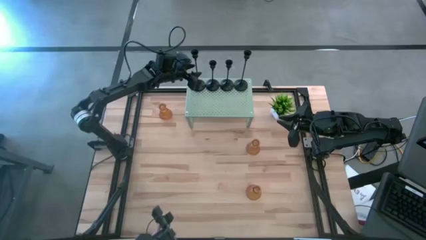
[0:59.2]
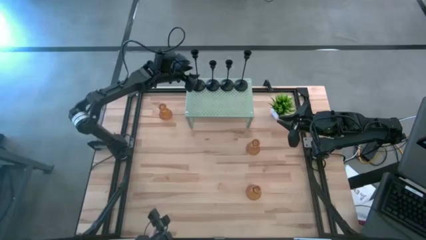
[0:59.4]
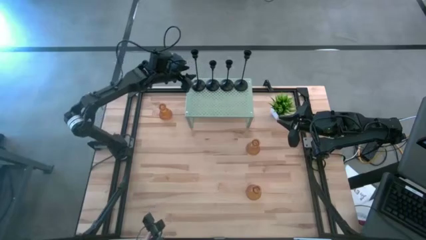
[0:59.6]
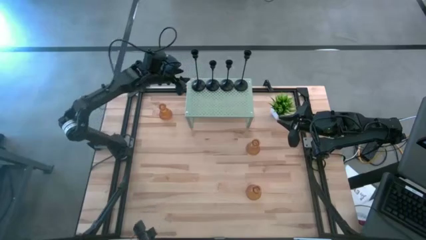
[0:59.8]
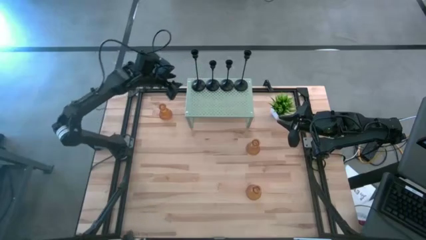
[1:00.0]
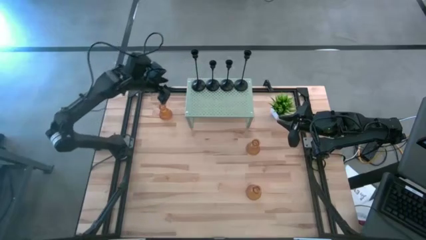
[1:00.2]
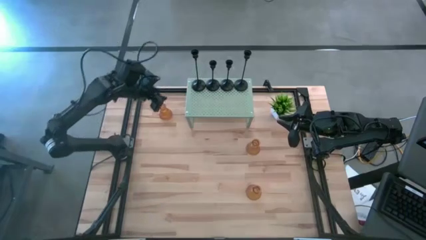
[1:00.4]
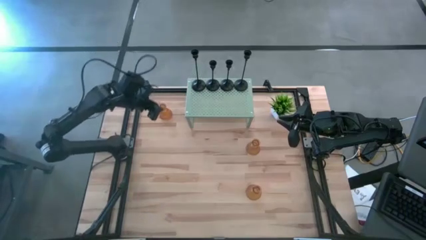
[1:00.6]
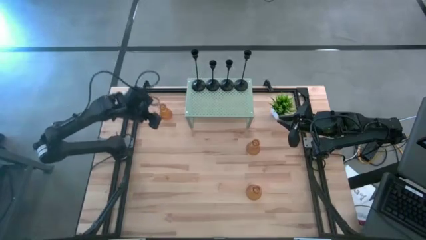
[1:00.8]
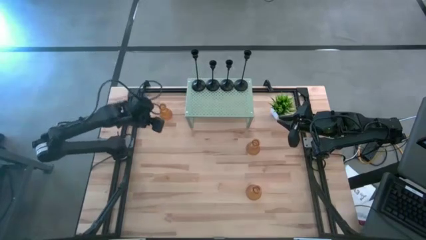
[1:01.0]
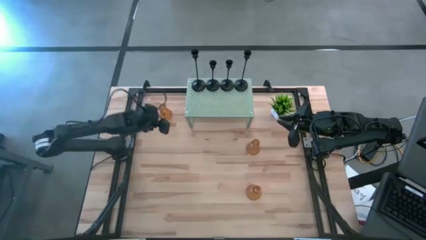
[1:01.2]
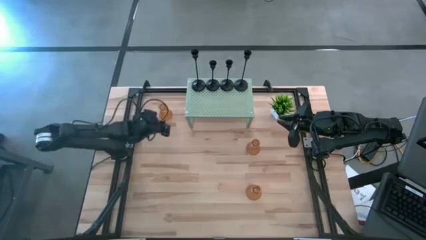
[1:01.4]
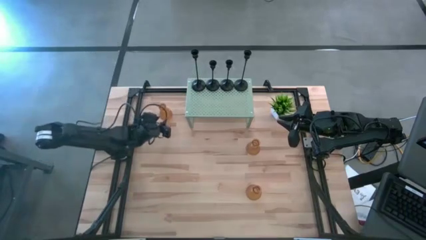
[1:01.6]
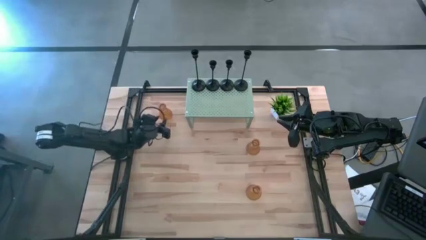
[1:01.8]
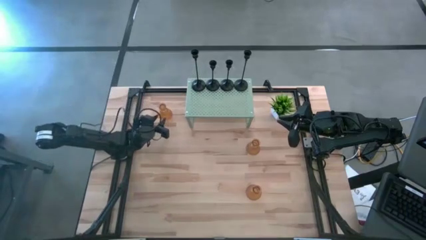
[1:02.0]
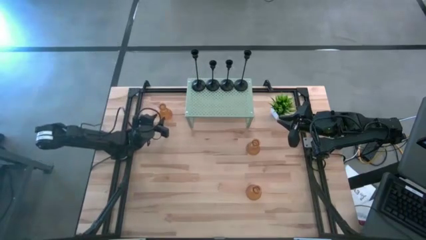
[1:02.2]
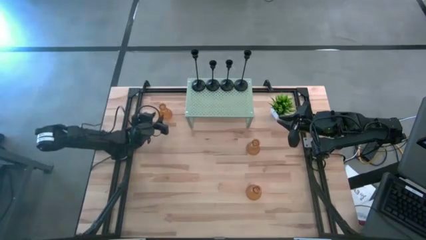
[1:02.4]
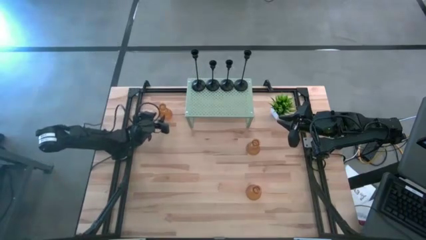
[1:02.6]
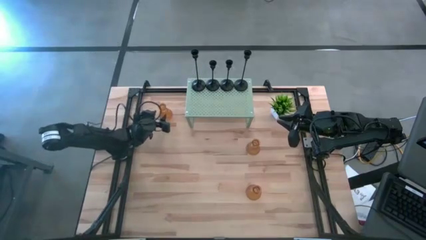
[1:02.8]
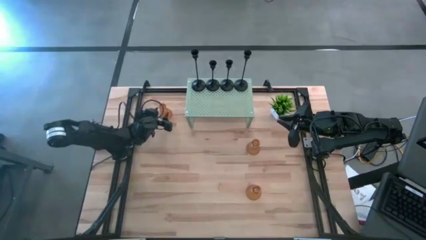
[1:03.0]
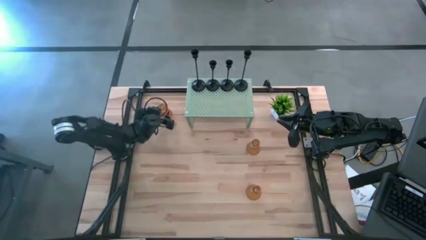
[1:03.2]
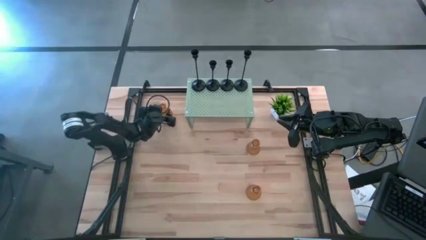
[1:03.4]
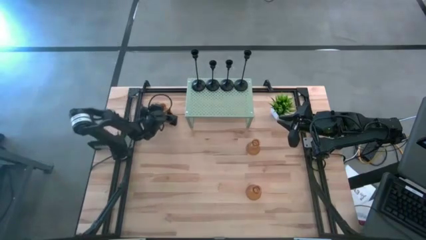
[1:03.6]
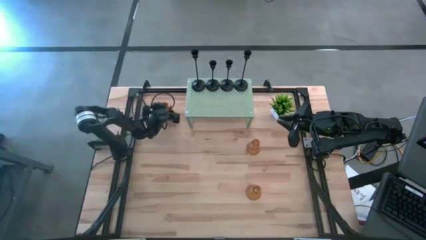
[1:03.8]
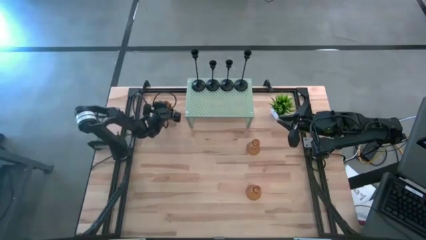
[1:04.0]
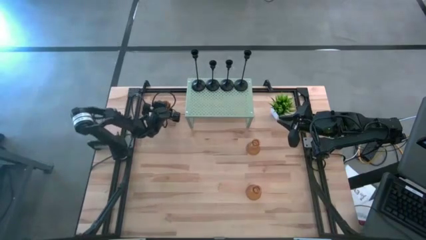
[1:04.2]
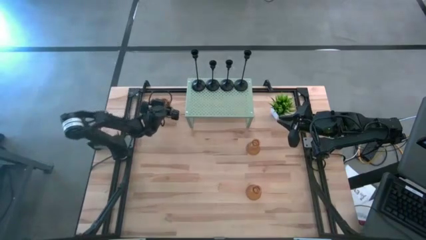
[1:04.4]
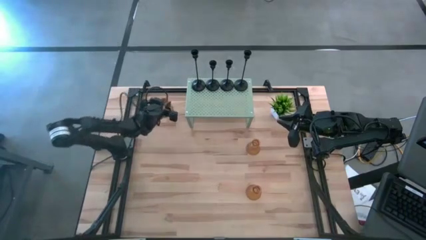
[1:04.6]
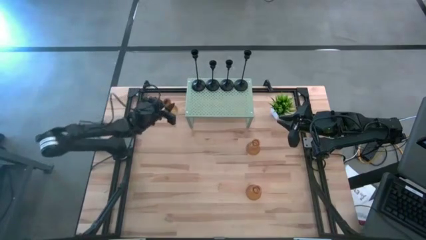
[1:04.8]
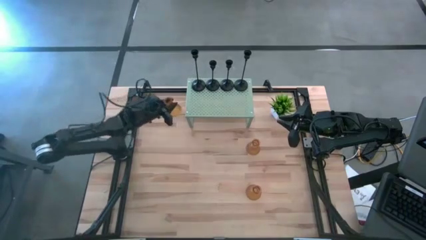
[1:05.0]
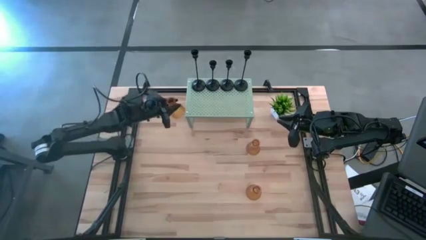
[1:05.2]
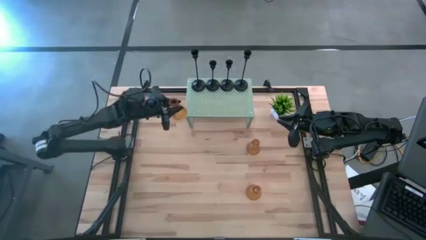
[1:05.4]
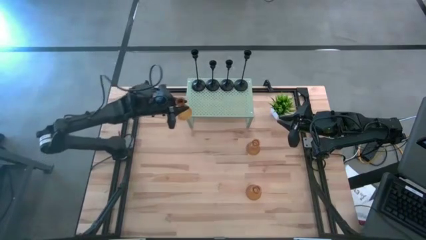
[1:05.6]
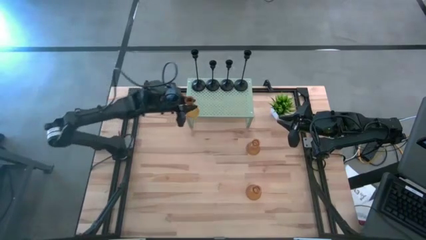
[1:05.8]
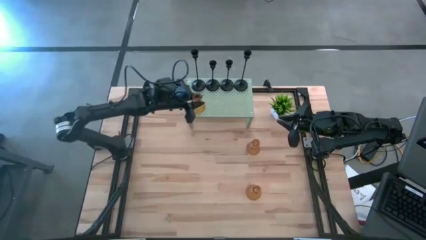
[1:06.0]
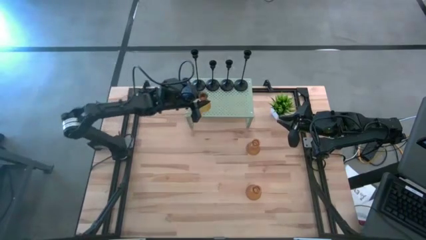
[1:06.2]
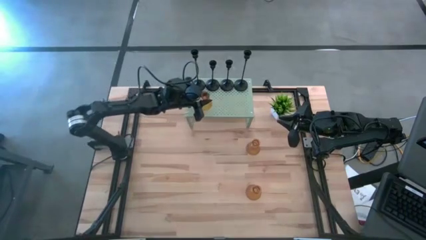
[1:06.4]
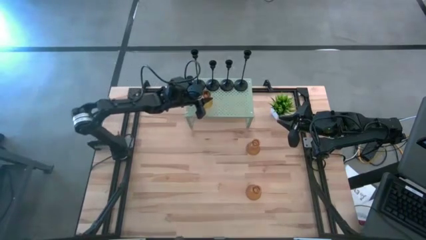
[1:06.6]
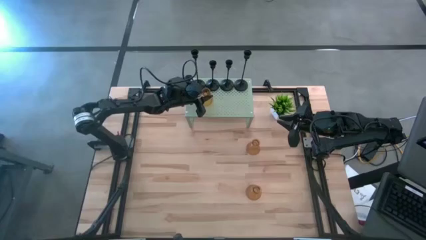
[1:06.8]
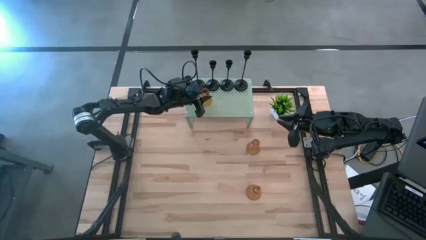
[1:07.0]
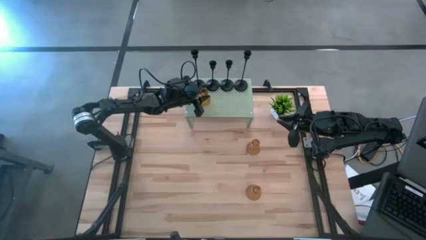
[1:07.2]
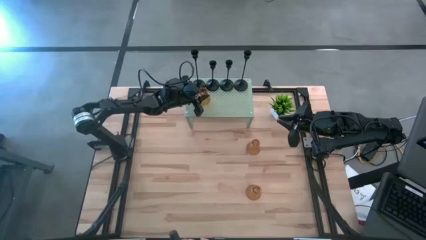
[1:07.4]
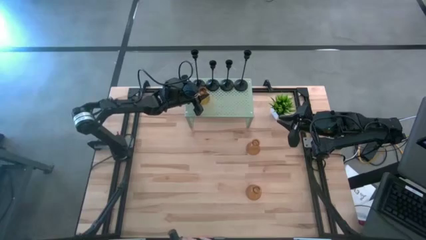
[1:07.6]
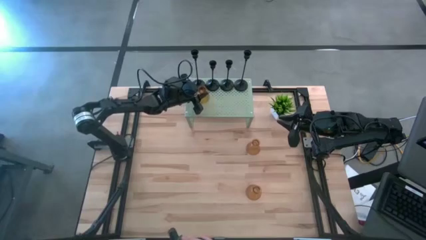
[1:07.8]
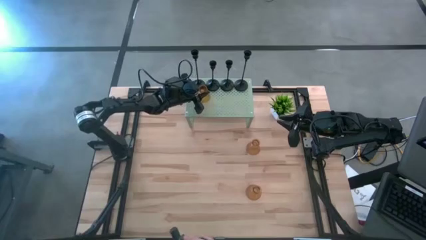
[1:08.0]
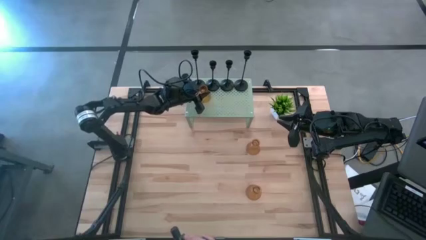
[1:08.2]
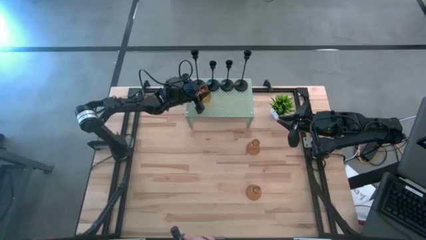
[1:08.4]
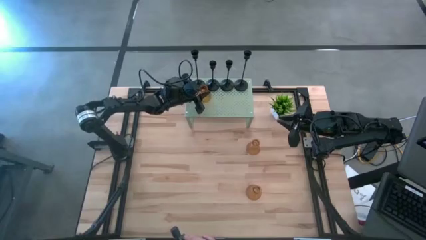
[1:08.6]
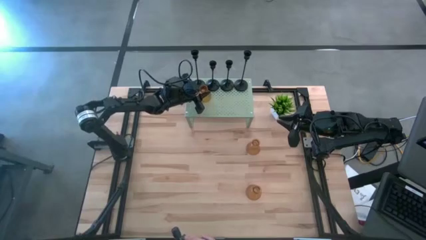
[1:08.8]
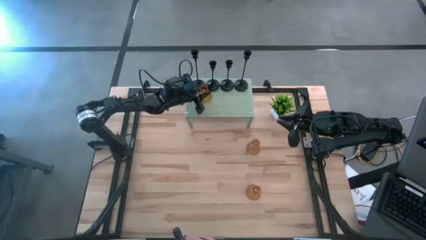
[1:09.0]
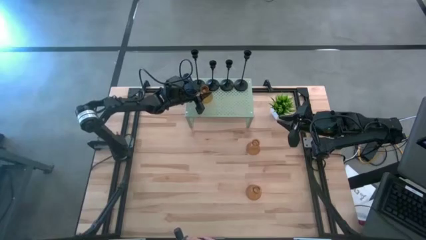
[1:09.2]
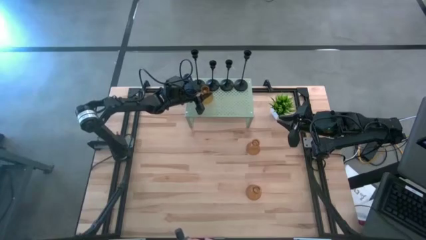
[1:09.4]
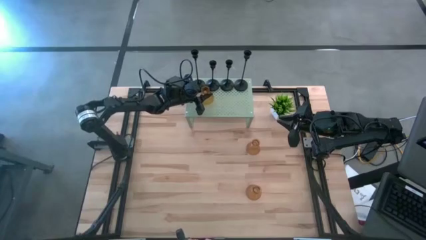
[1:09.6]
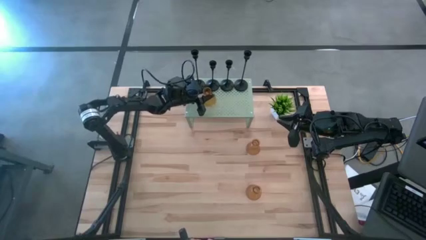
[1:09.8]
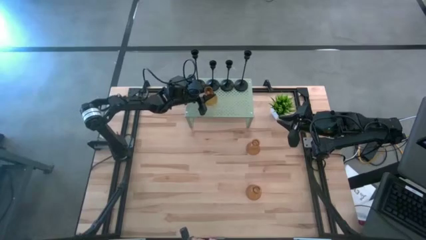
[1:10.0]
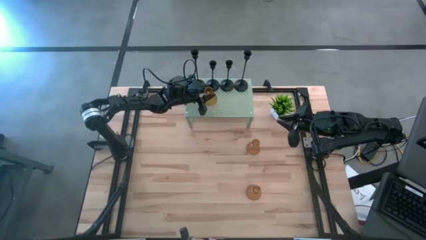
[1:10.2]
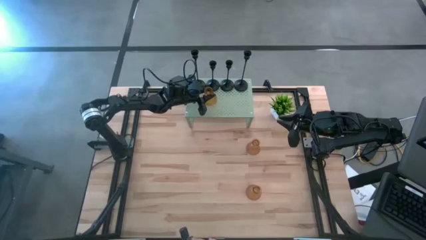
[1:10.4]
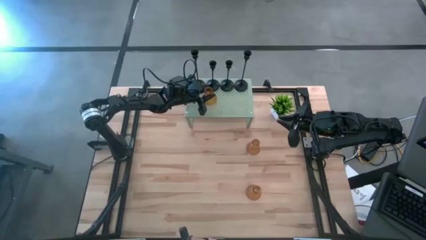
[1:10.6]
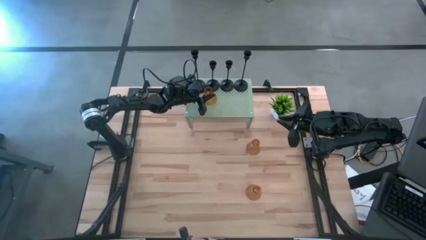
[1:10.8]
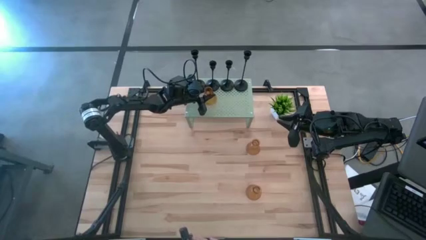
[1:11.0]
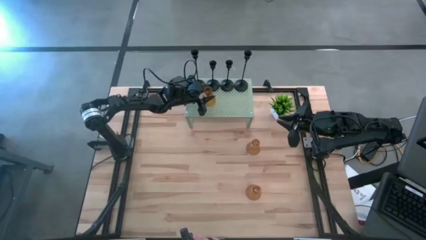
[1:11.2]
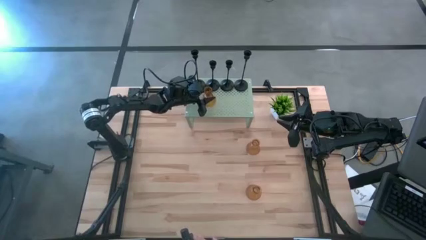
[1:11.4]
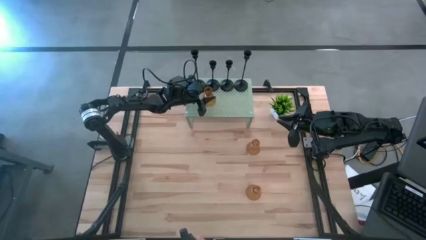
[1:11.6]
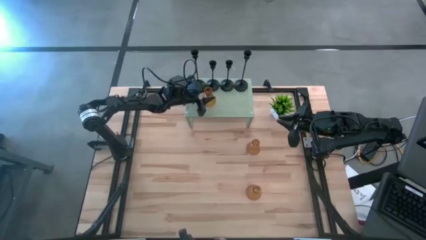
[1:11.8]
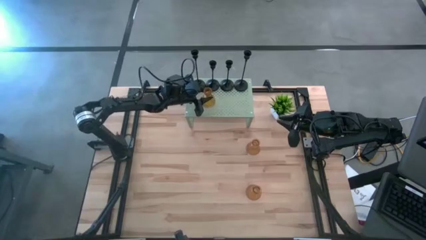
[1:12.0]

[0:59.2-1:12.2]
Task: Pick & Place candle stick holders
Put the top orange candle holder on the shelf in front of the black candle holder

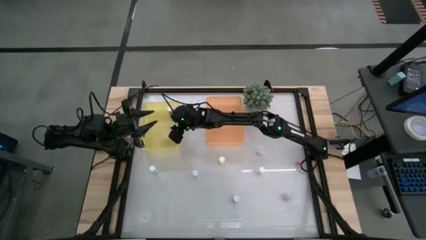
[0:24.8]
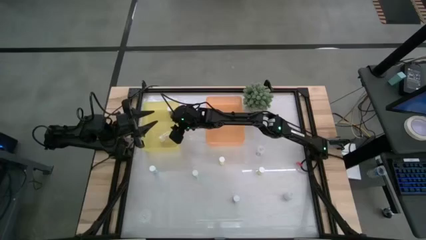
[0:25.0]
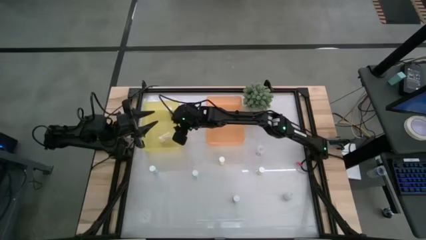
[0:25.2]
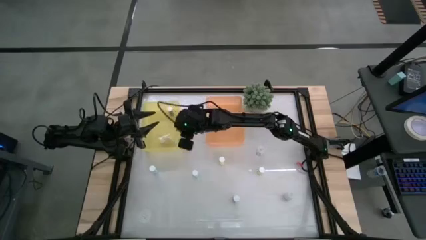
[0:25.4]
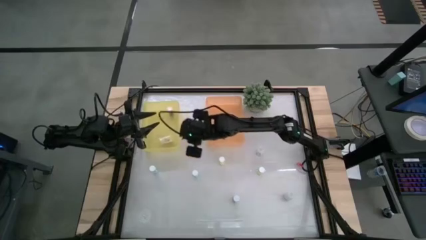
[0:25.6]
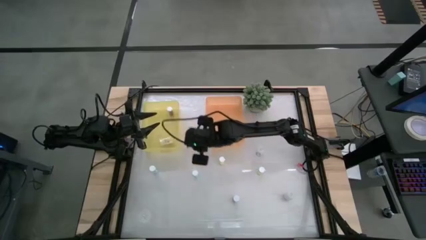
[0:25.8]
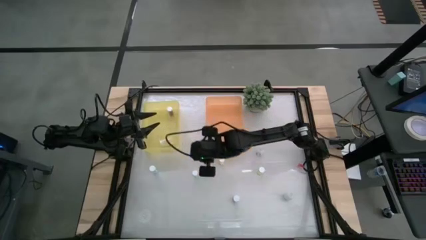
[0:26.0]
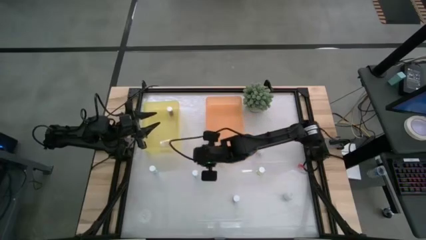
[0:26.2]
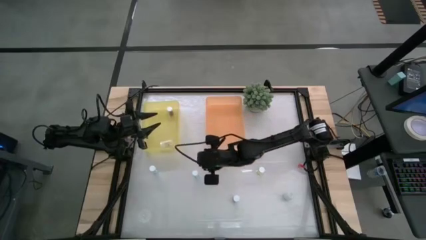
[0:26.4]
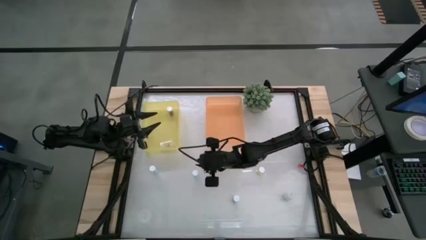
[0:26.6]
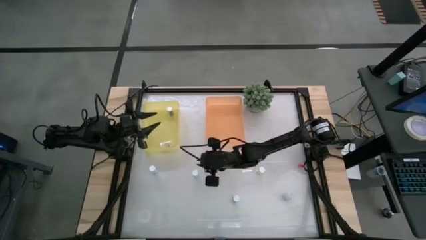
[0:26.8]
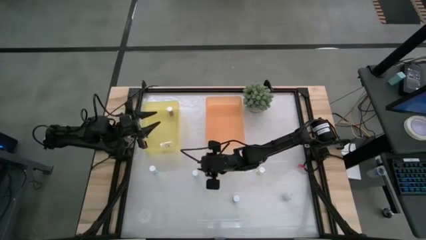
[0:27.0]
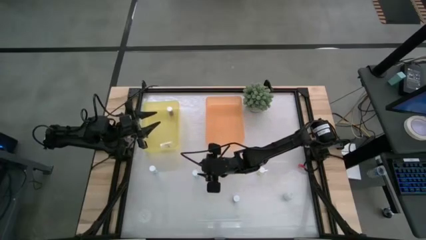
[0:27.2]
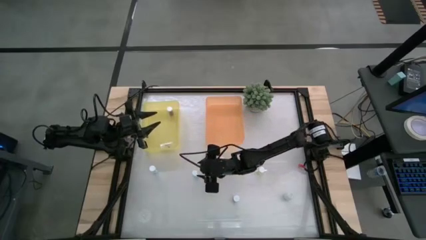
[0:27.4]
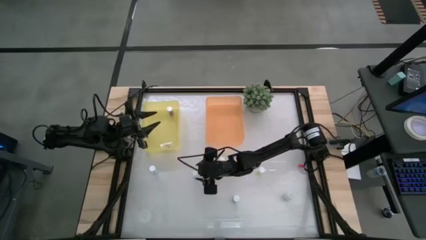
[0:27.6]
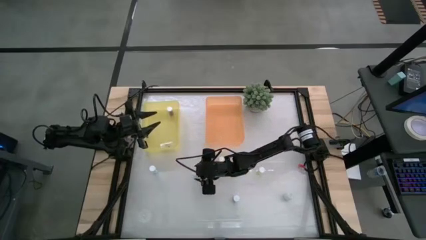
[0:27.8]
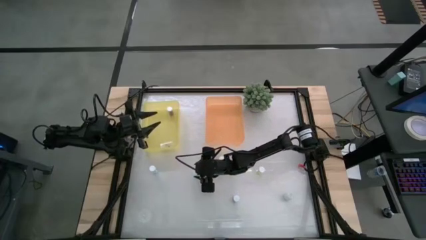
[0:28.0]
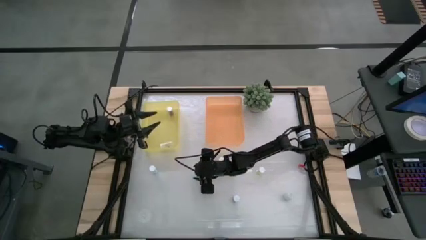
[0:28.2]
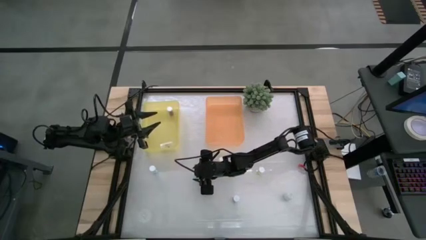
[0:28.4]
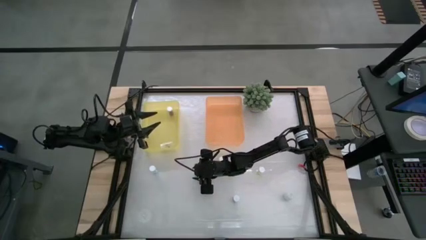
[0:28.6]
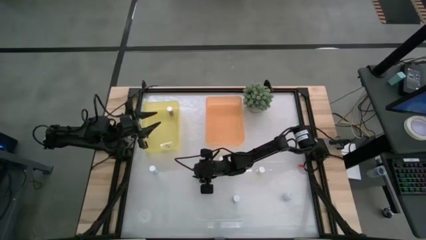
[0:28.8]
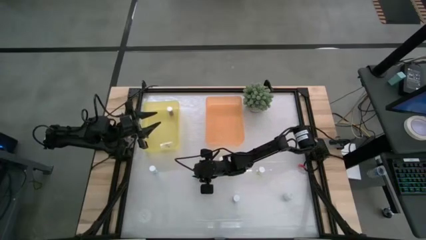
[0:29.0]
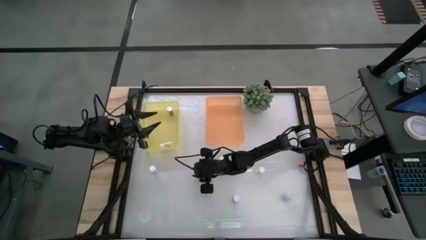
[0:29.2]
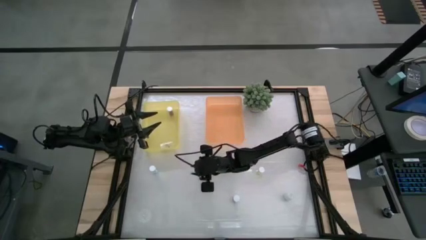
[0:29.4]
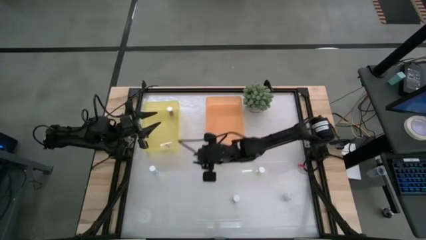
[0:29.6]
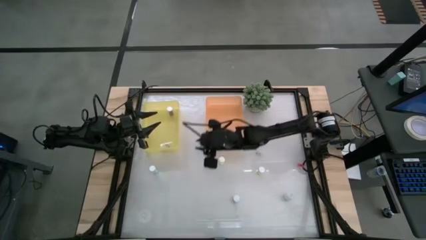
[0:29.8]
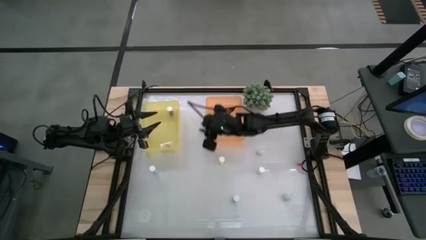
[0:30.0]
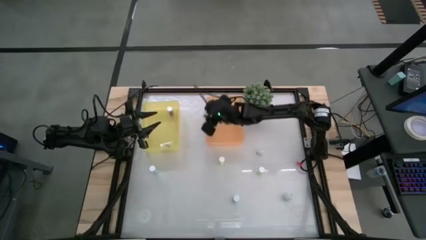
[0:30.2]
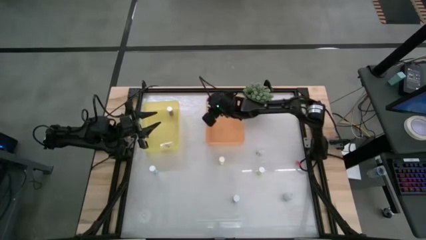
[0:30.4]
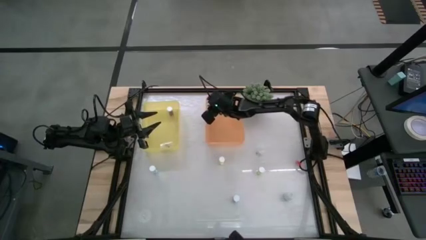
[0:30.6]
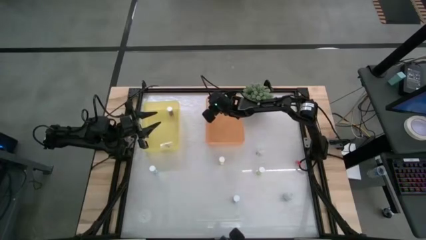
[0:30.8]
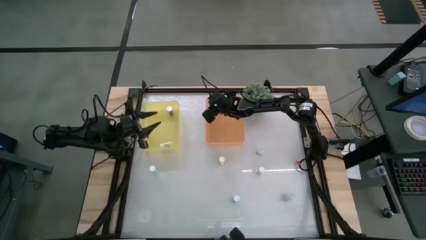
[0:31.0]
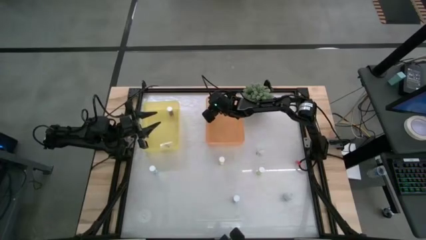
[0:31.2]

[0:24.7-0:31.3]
Task: Pick and place medicine bottles into bin by pill shape (circle, oval)
Put the right green tablet bottle into the orange bin
